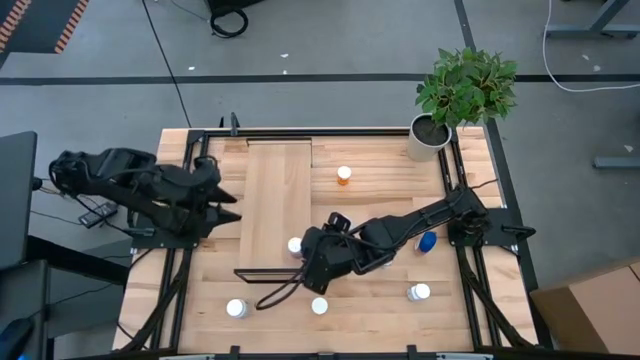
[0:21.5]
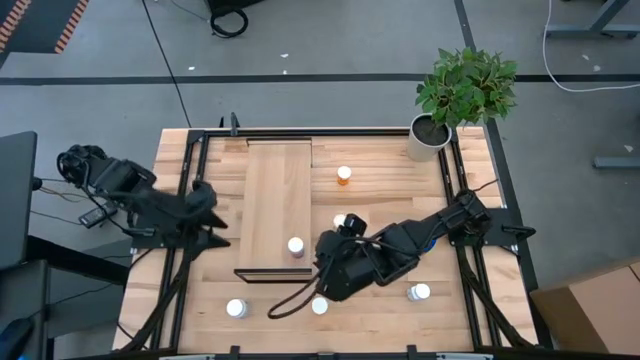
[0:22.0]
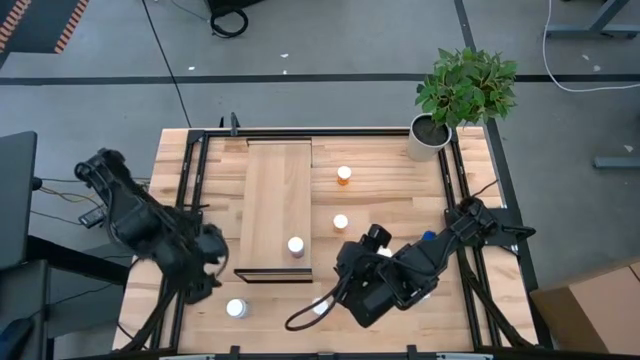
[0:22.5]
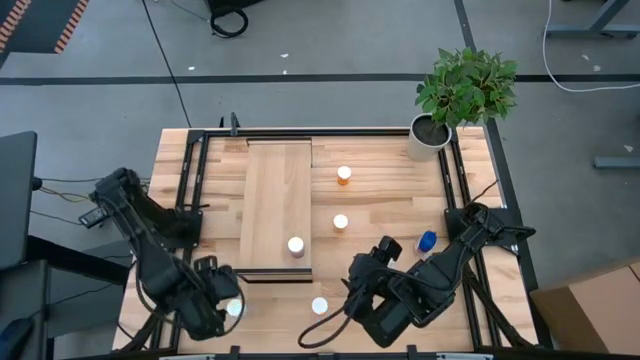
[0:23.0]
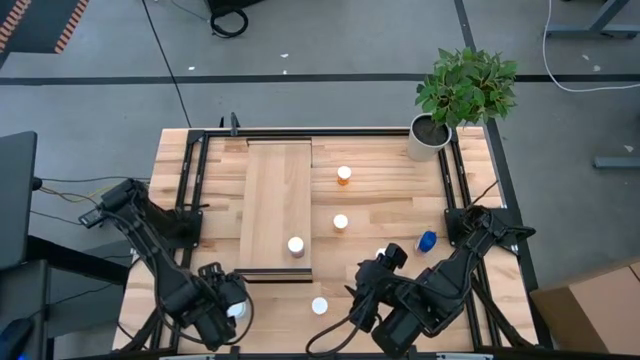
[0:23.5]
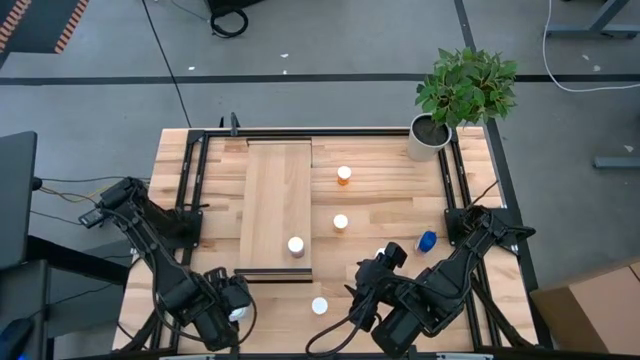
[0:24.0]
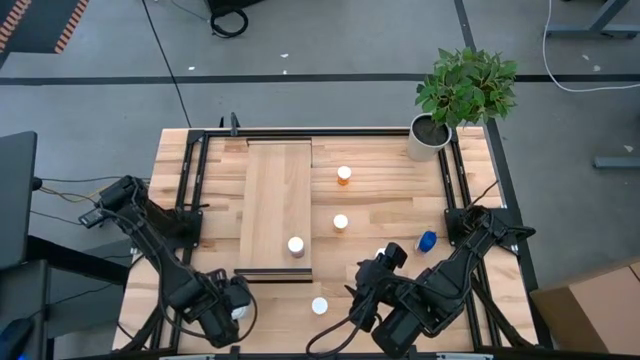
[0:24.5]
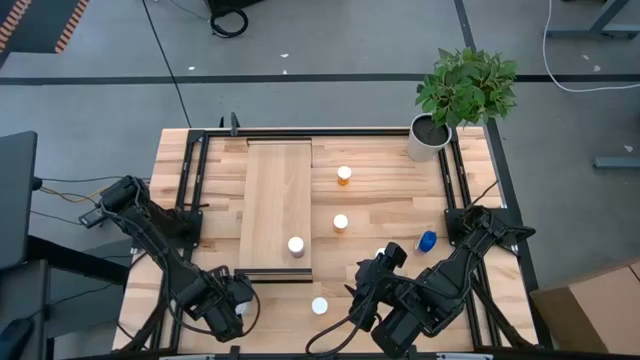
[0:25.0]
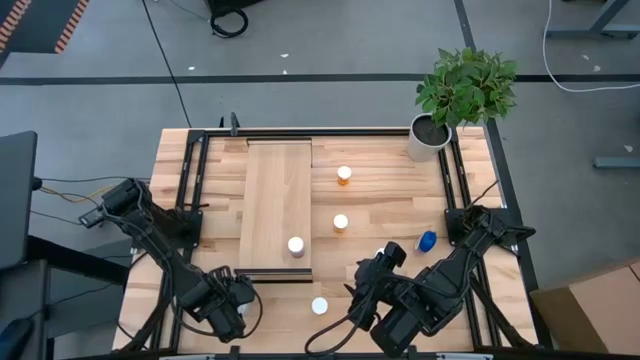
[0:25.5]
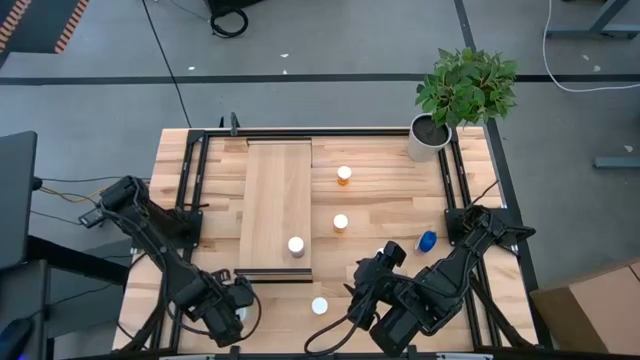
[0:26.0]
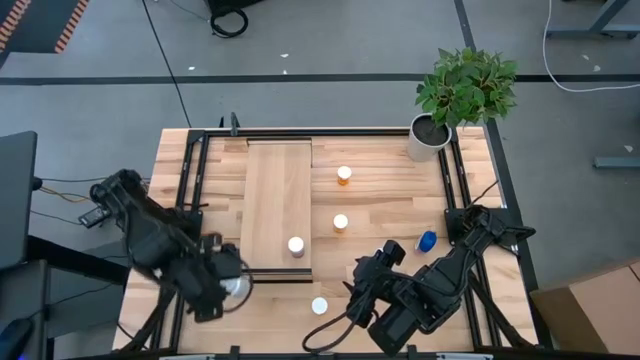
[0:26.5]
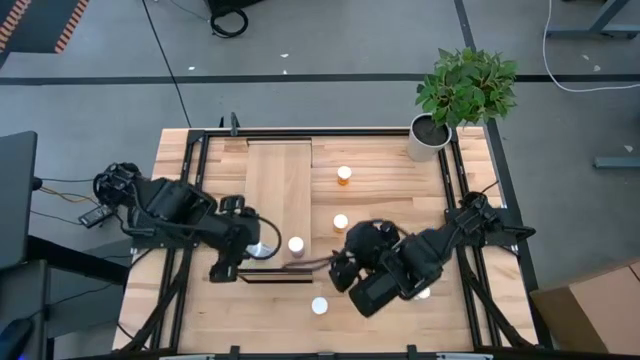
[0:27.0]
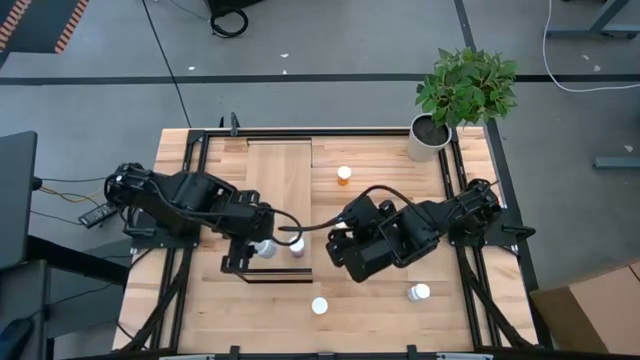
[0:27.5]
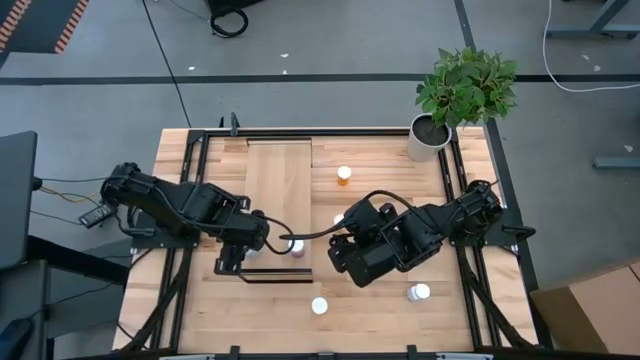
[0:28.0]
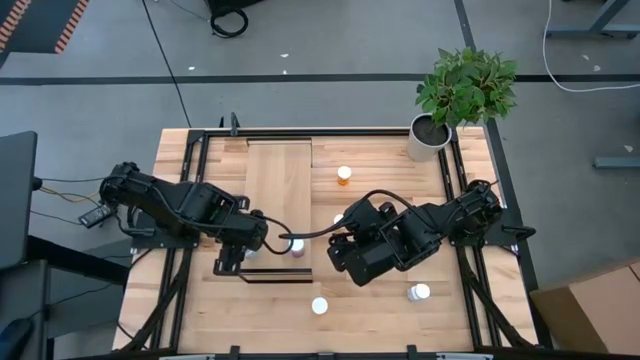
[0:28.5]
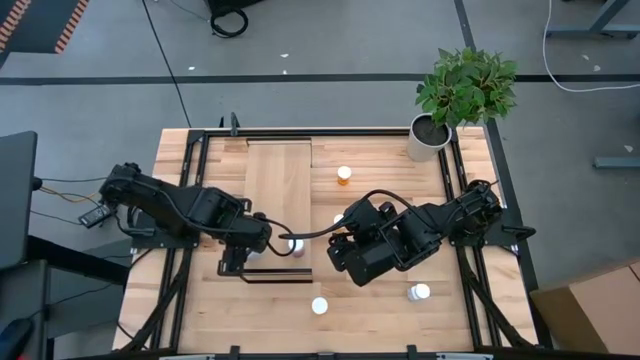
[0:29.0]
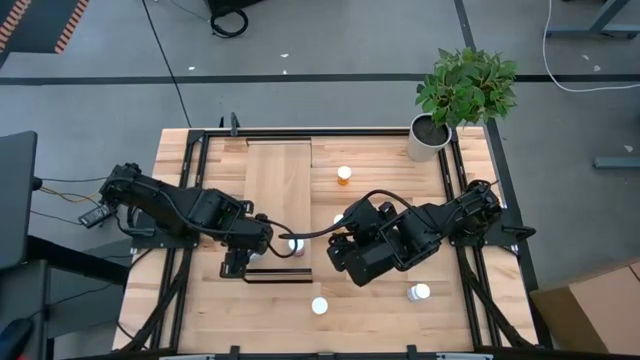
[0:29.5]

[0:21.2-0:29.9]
Task: Pick and place medicine bottles onto shelf by color
Put the bottom white pill bottle on the shelf

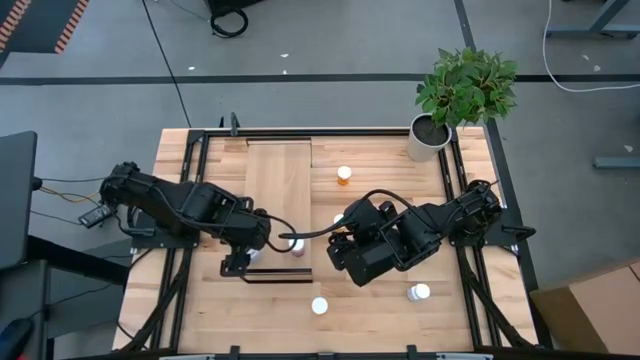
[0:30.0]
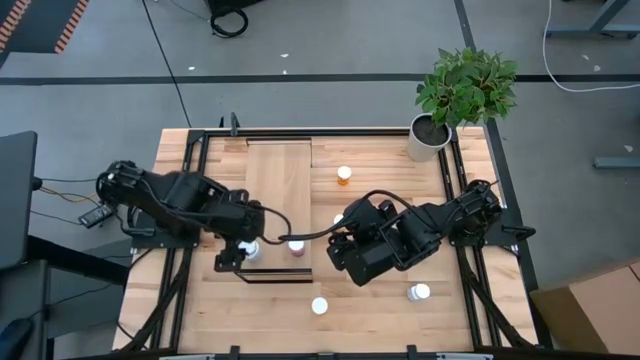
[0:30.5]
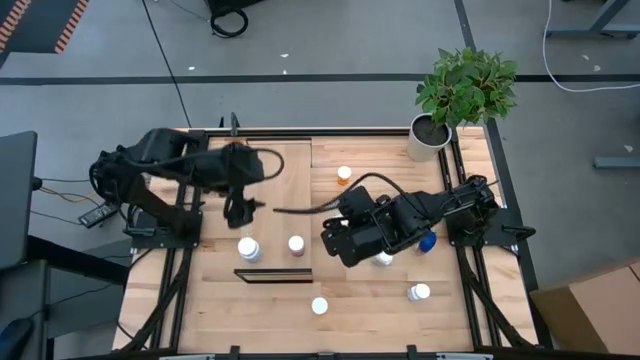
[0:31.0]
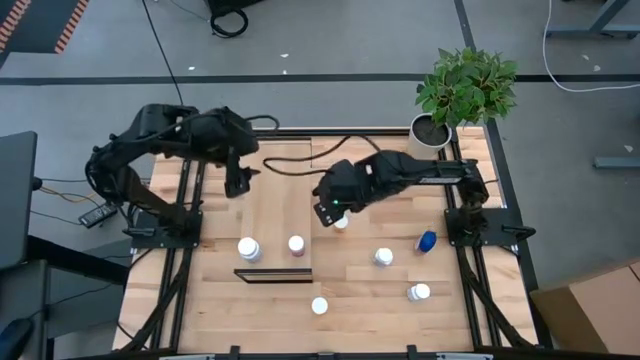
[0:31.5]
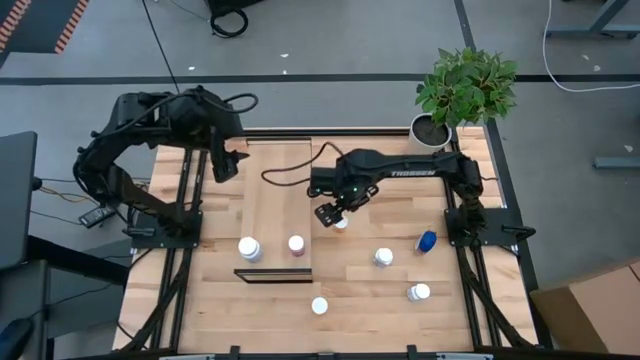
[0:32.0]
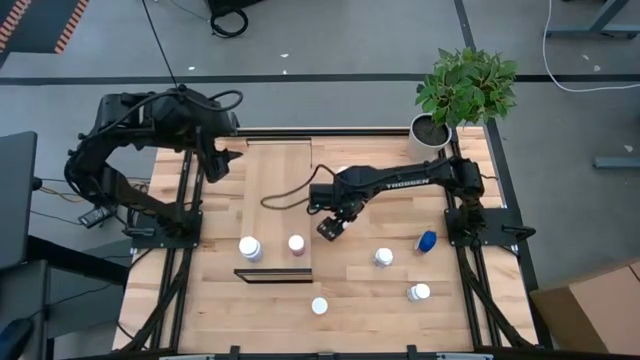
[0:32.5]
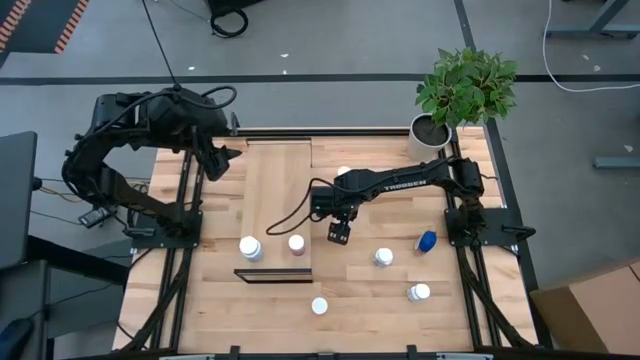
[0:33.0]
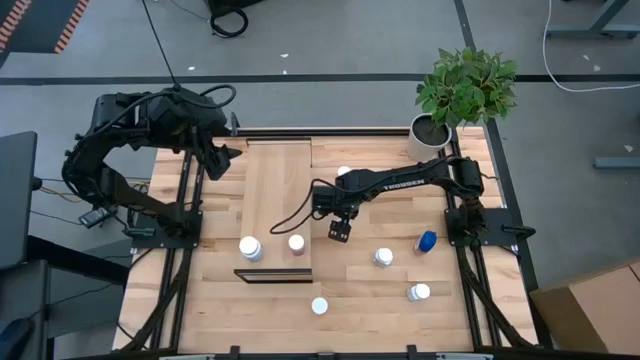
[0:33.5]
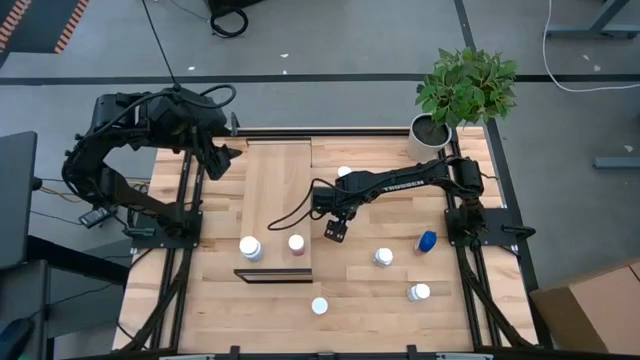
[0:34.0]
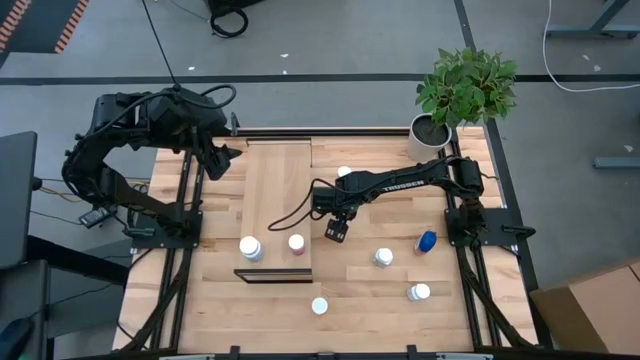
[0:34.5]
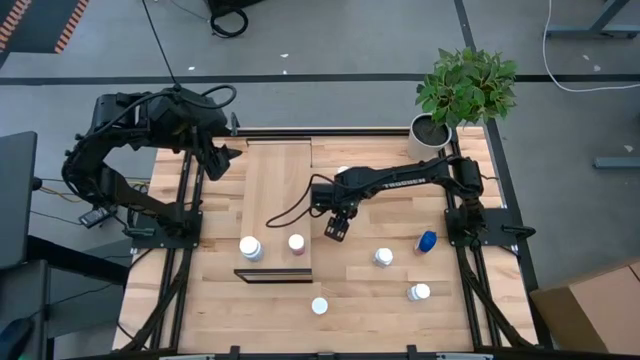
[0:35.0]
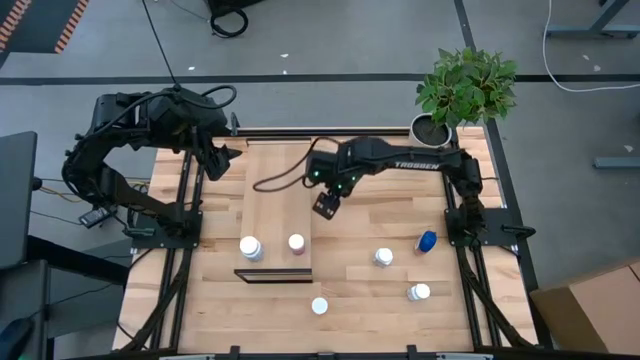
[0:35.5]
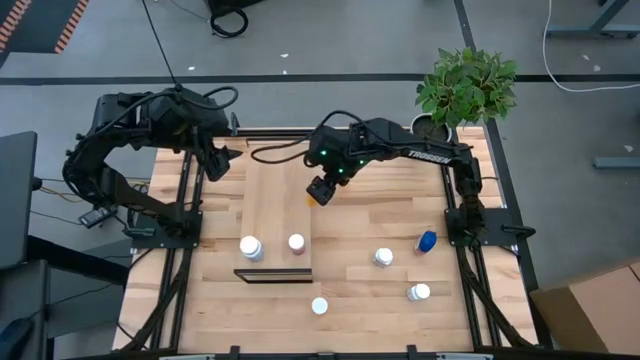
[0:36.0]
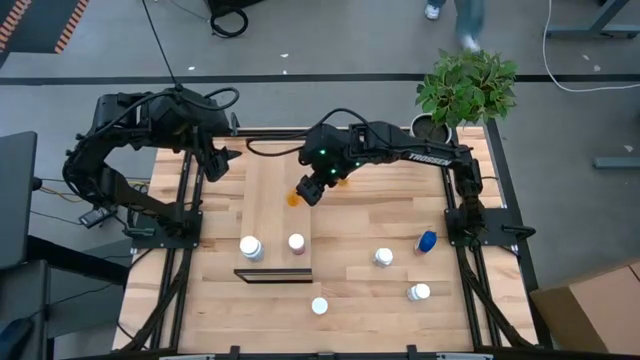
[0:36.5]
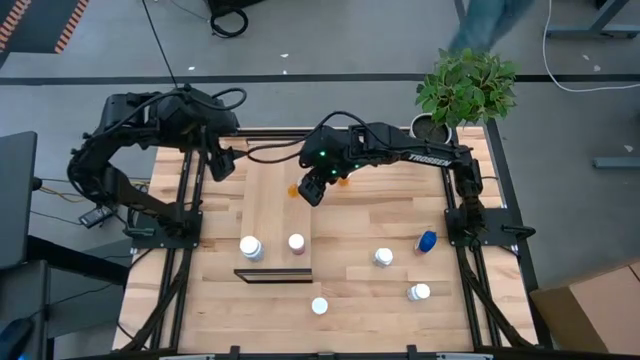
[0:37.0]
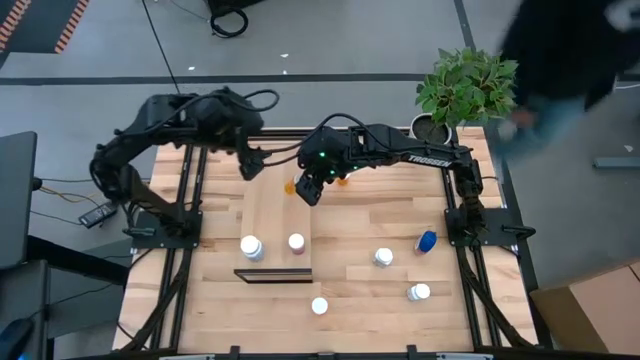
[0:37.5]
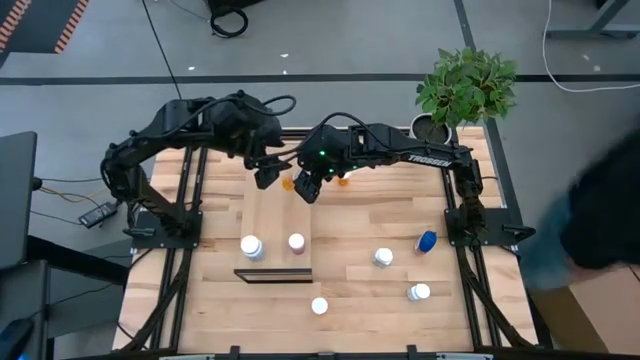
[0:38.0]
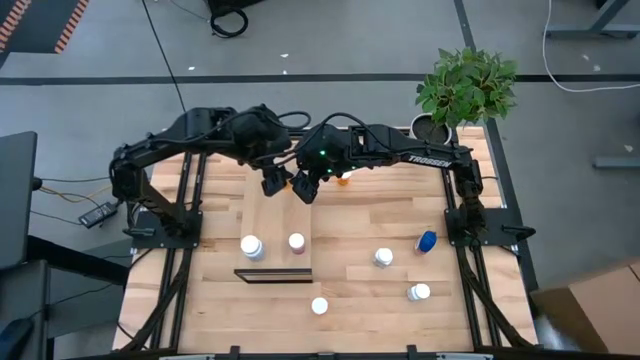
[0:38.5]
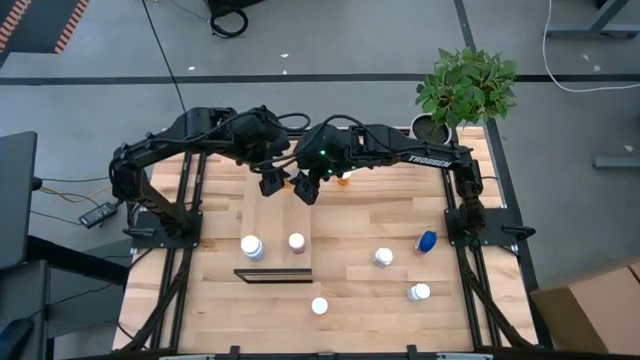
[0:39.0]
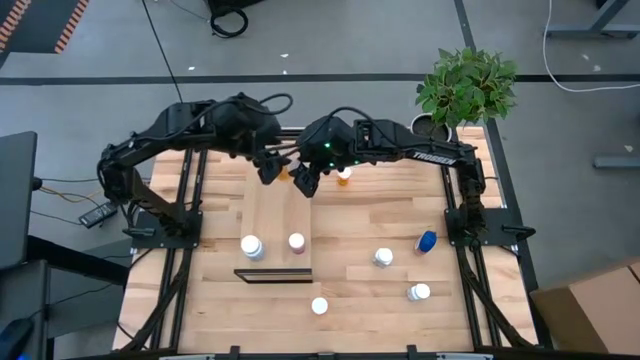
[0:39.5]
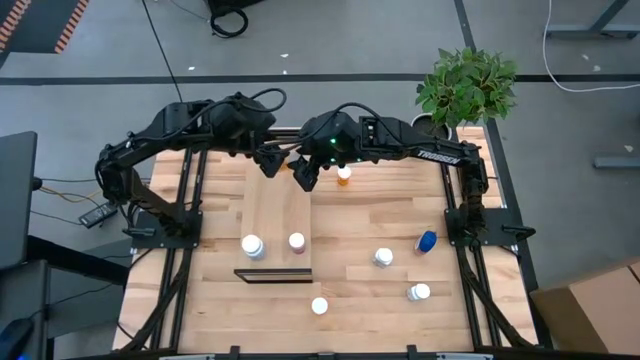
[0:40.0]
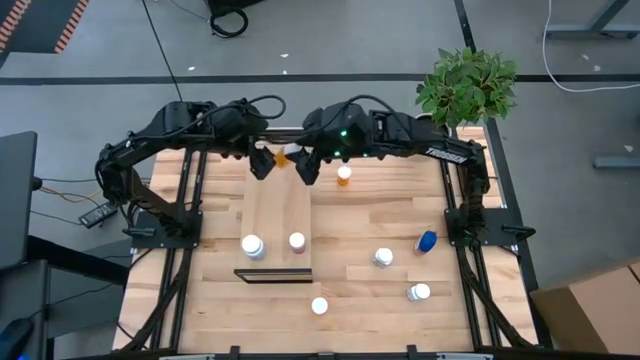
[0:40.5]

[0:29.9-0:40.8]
Put the middle orange pill bottle on the shelf
